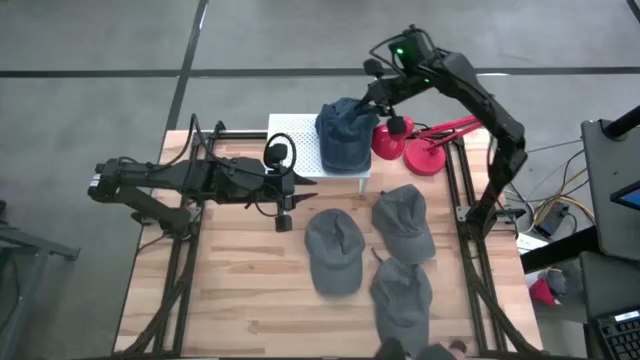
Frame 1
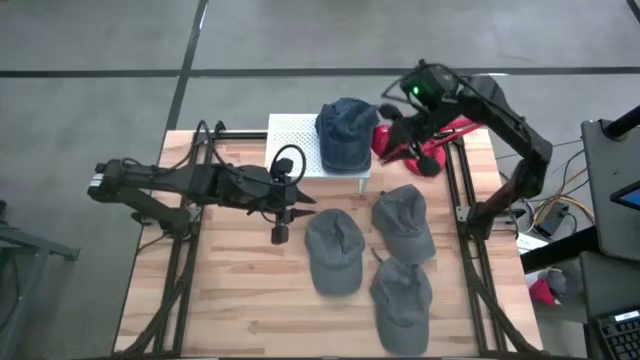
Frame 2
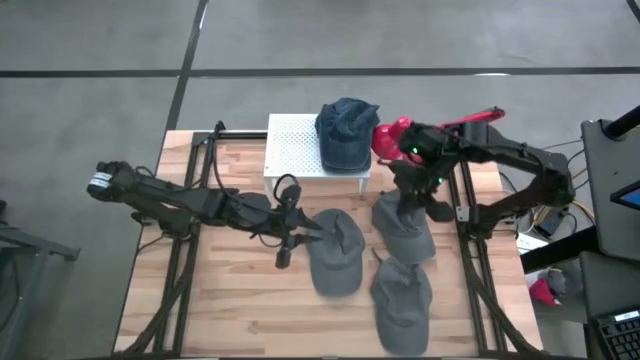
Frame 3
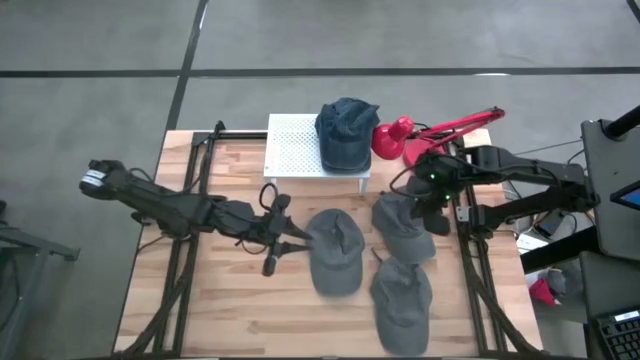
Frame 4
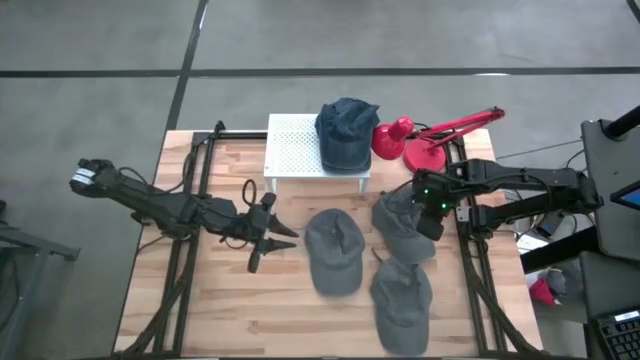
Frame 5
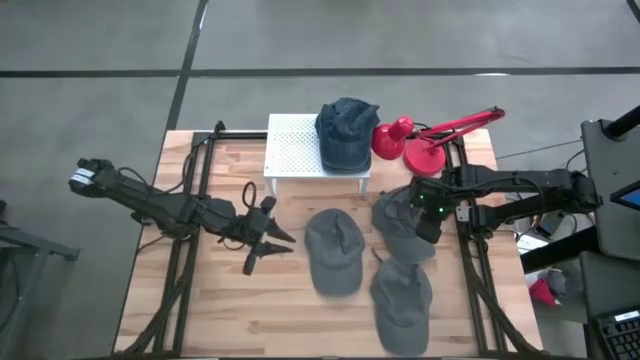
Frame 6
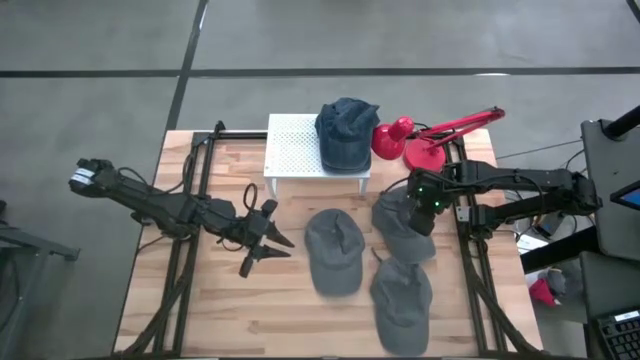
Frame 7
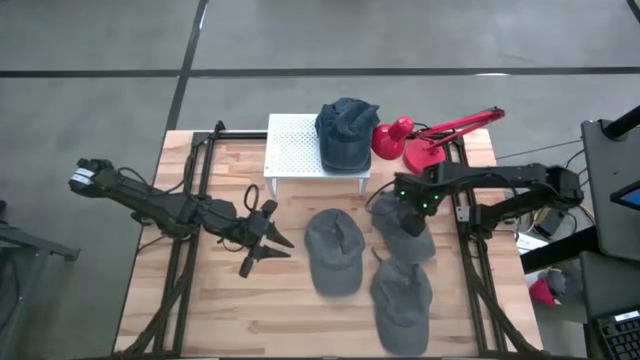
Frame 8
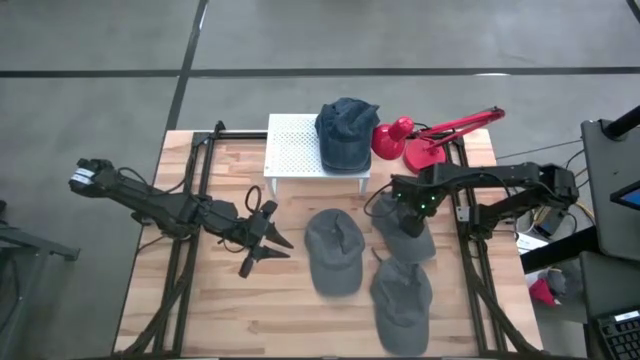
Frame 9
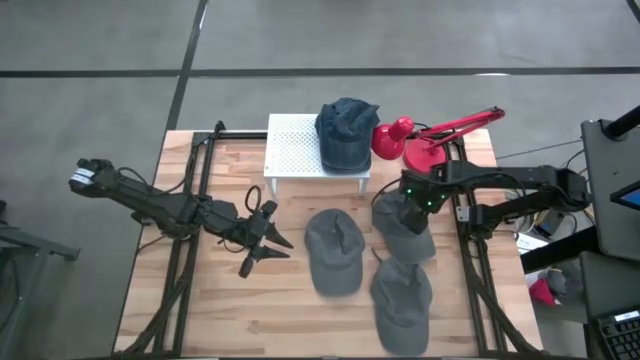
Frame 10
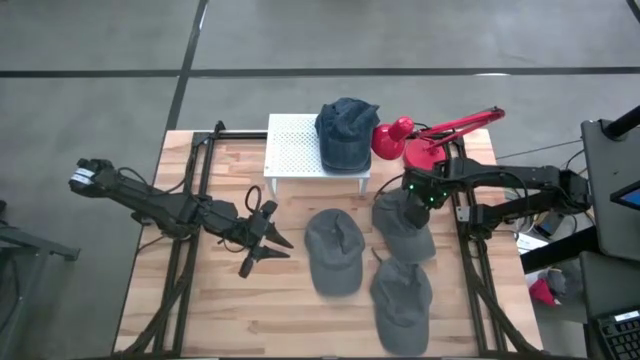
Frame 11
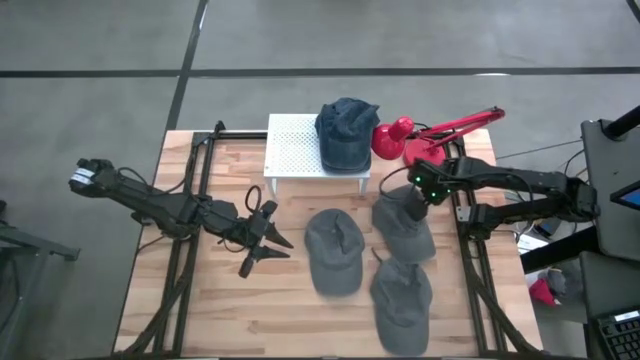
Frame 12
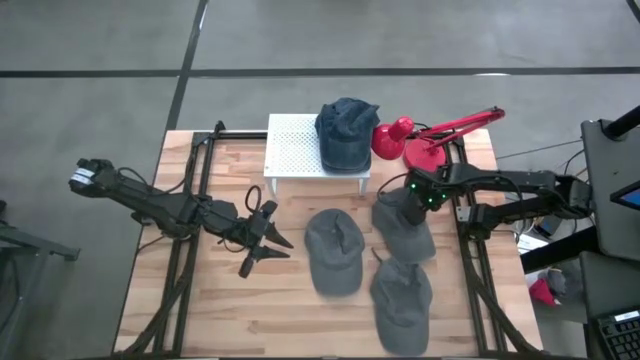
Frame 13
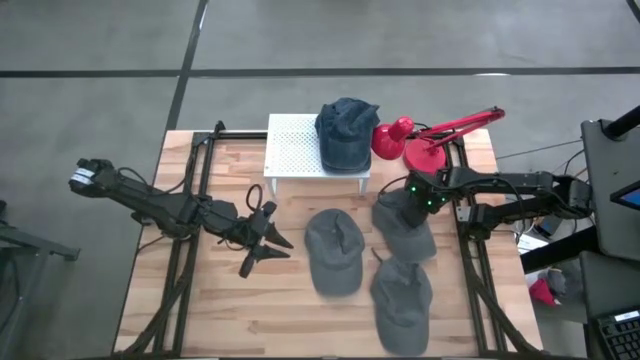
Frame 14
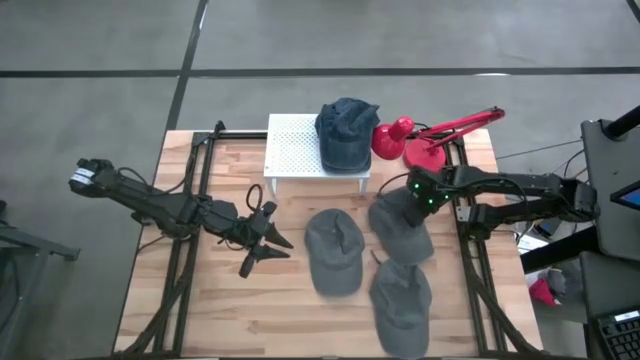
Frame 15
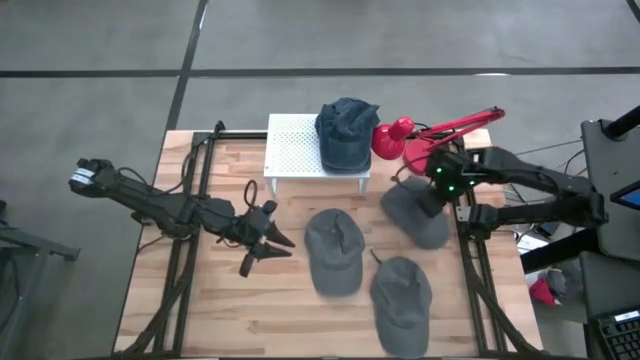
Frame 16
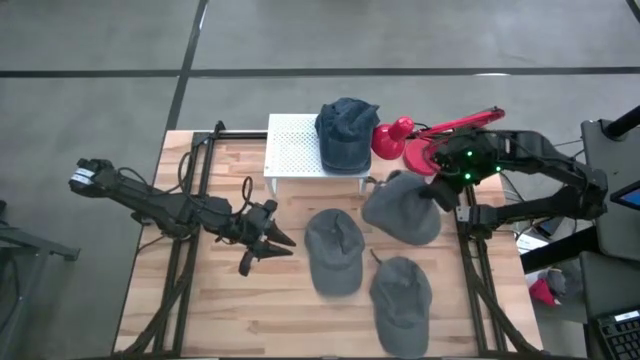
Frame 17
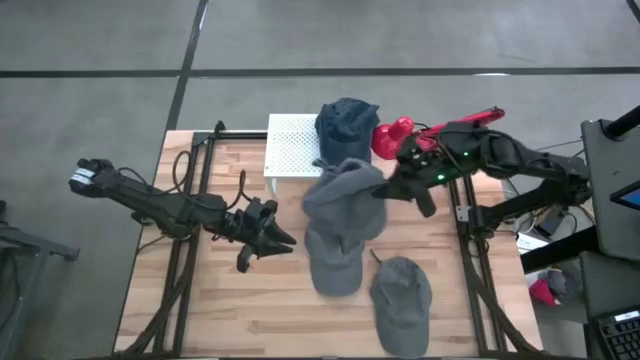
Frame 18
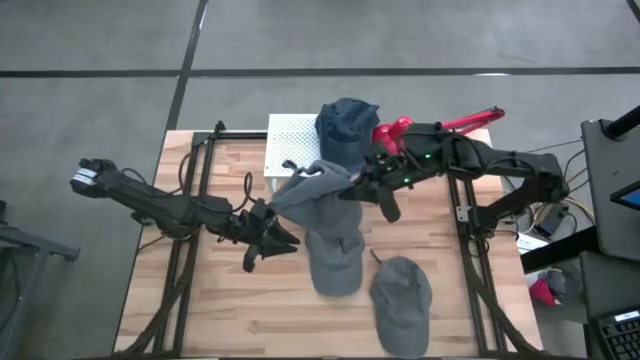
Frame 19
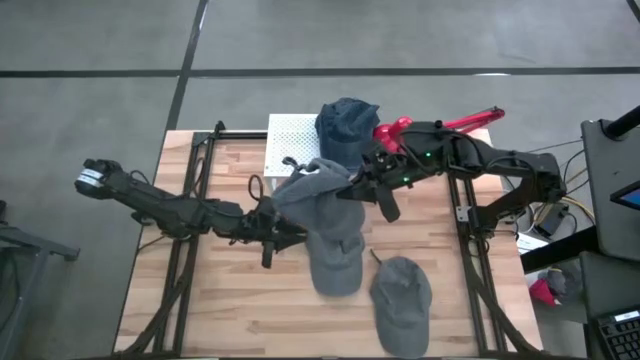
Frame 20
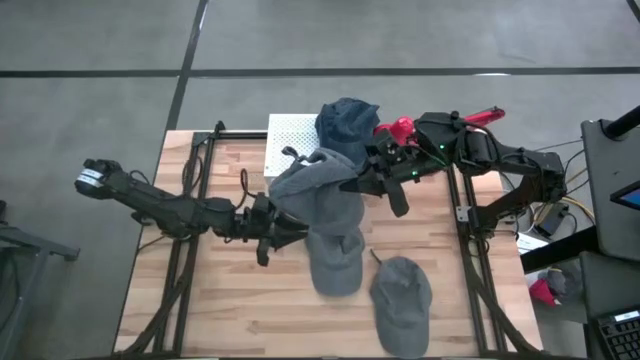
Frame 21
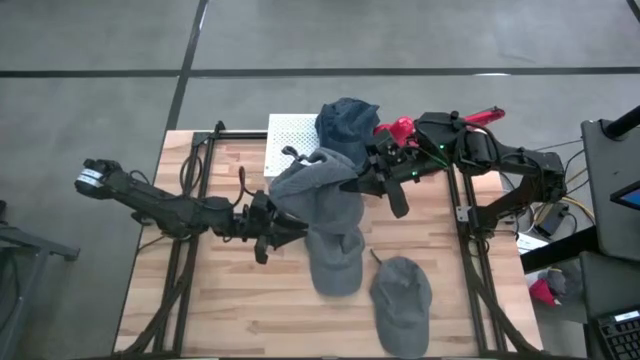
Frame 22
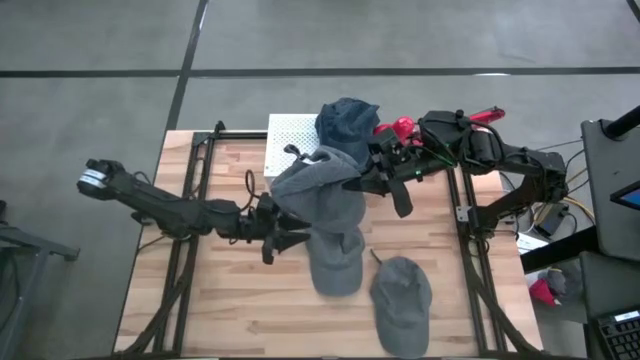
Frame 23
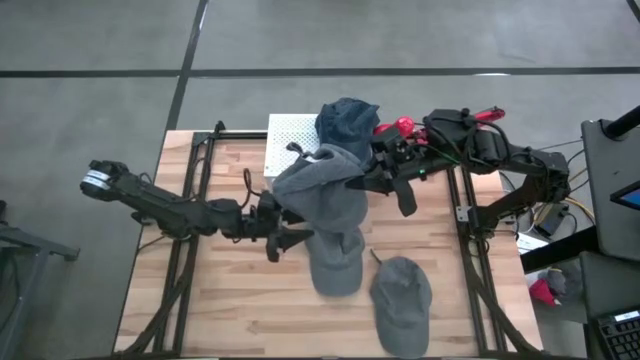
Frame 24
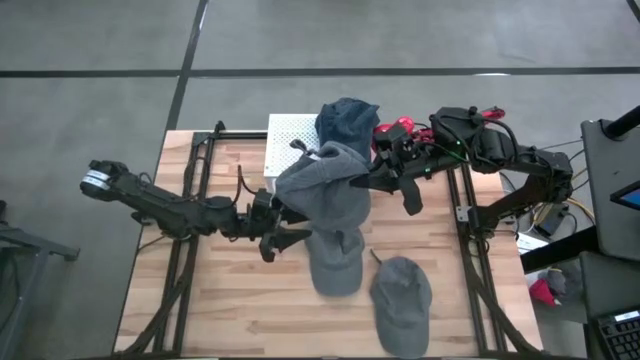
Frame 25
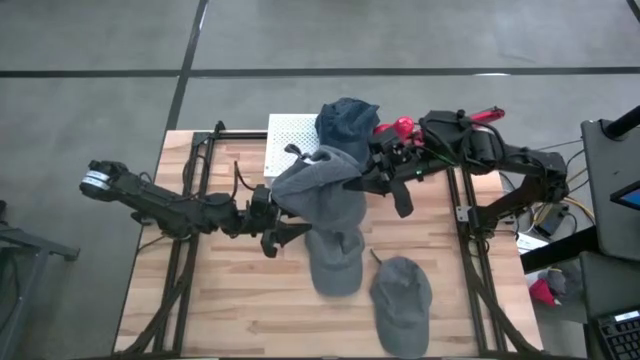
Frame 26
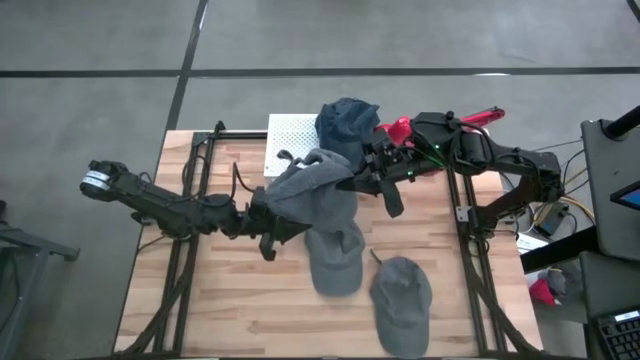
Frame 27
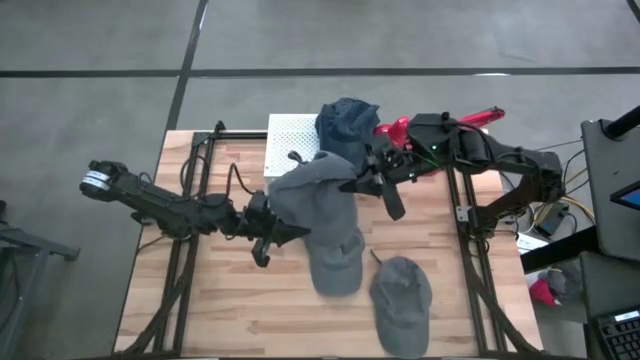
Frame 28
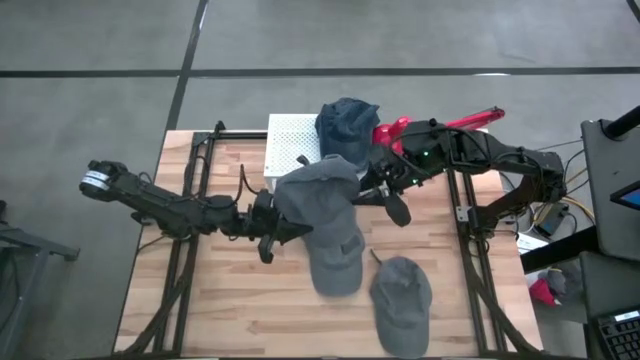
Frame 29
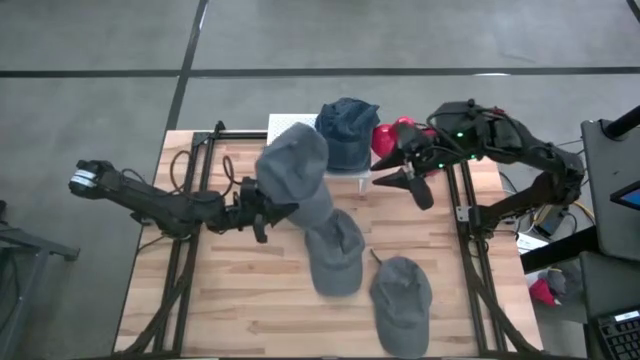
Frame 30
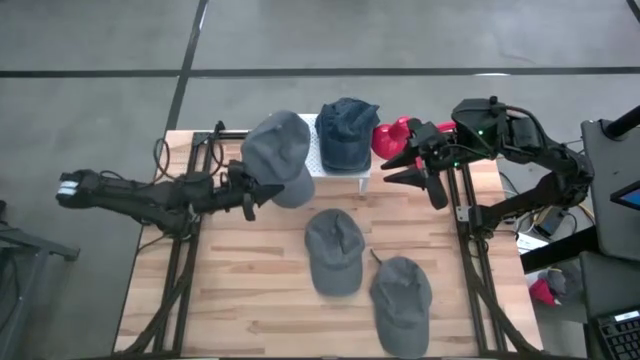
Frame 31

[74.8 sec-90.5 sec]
Task: Pick & Place hat
Put the top right gray cap on the shelf

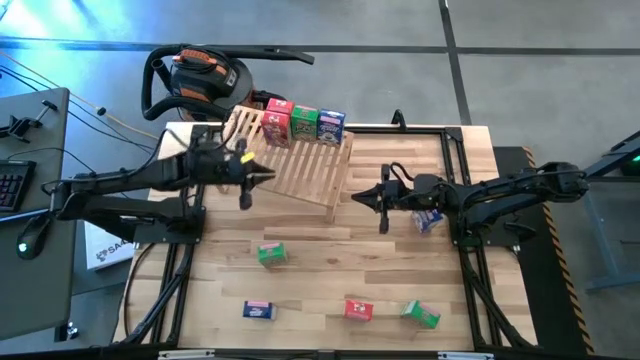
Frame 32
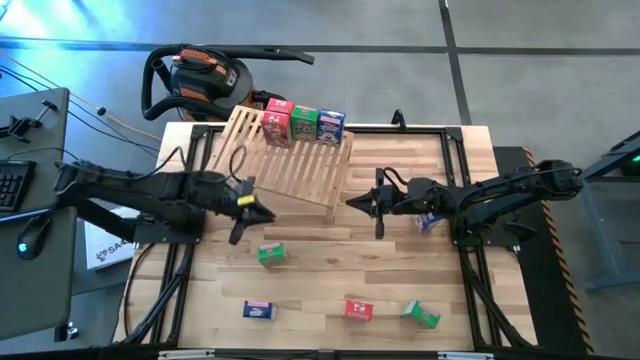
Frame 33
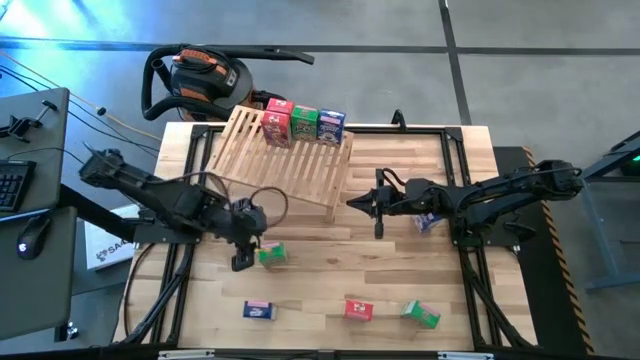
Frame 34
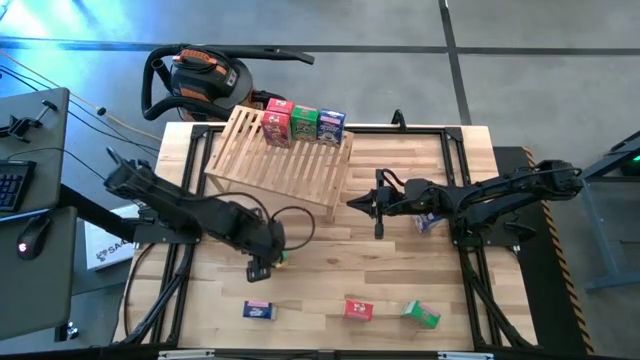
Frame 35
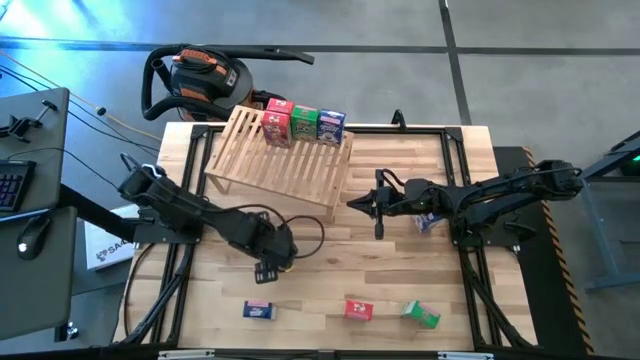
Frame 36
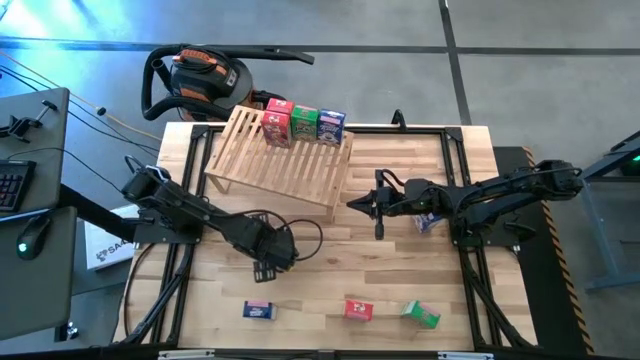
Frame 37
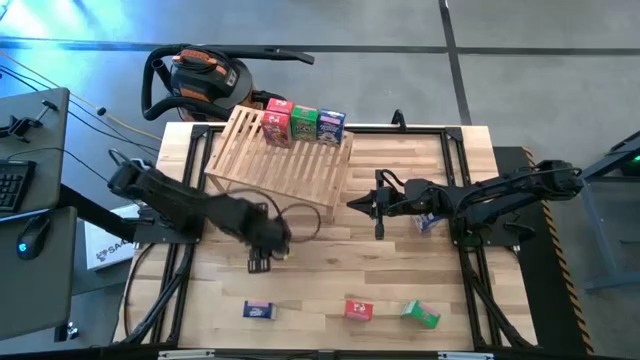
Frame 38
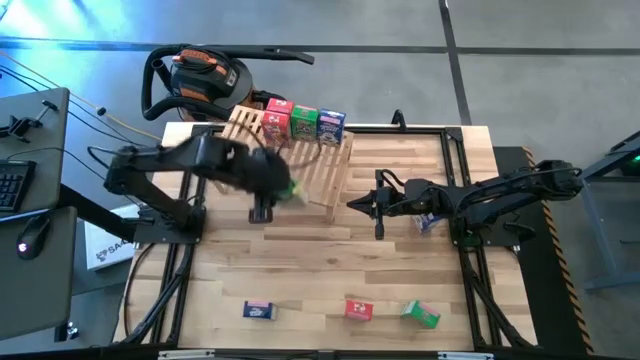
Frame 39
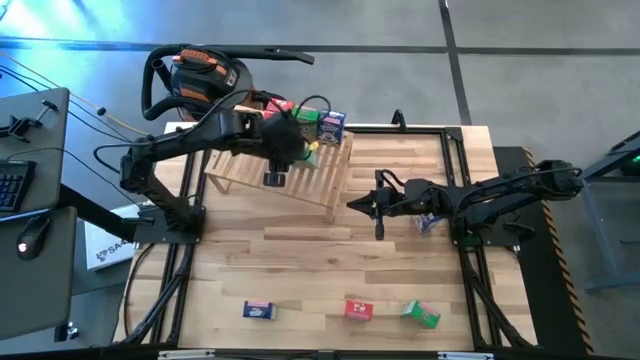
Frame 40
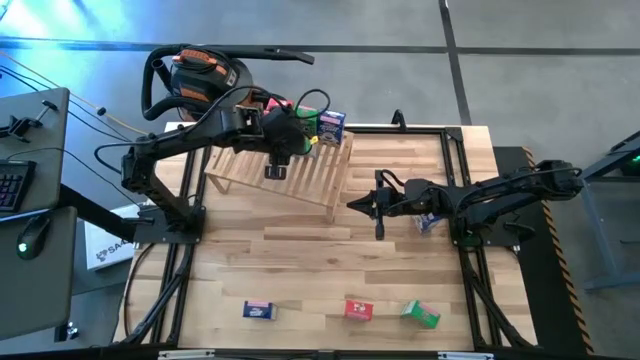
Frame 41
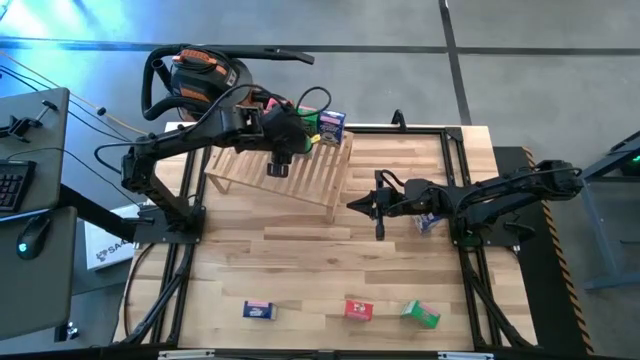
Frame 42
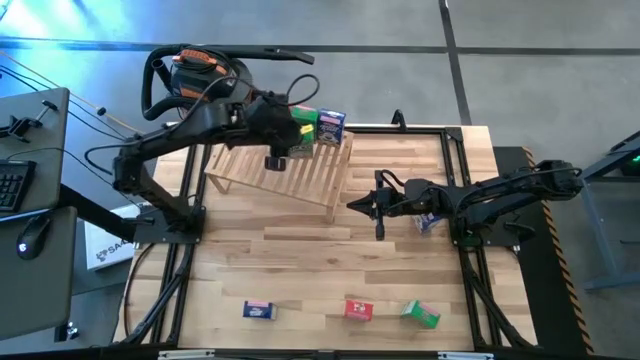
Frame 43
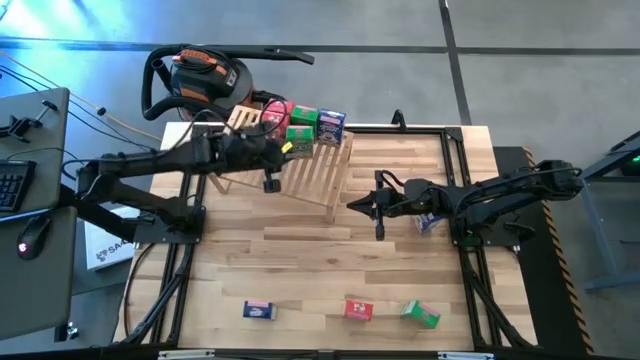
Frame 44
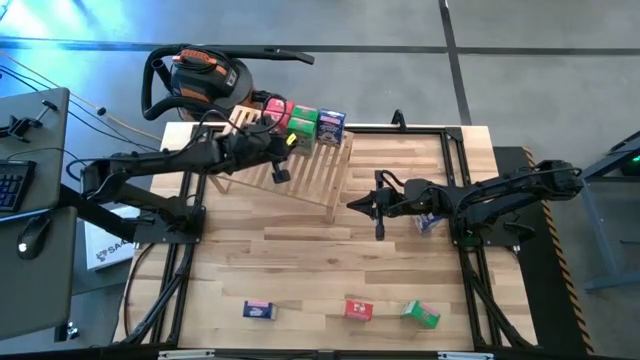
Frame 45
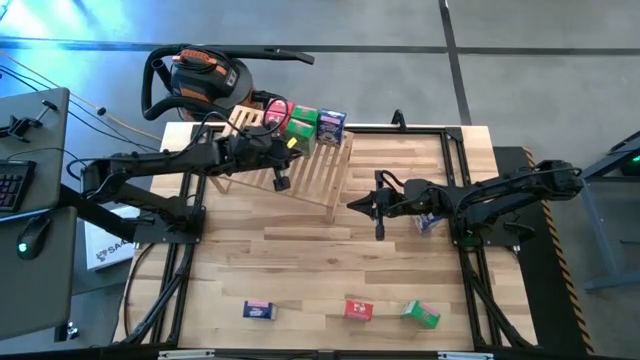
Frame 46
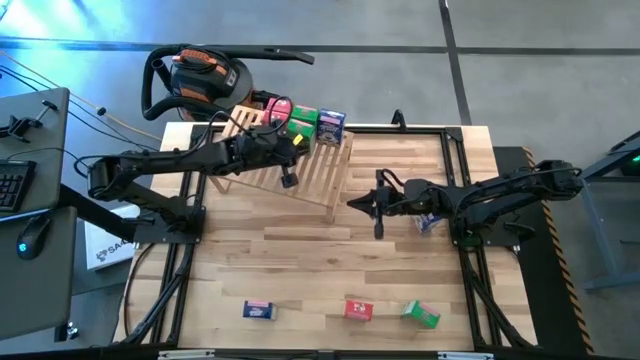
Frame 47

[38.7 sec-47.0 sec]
Task: Stack cereal on shelf
Put the left green cereal box aligned with the other green cereal box on the shelf
